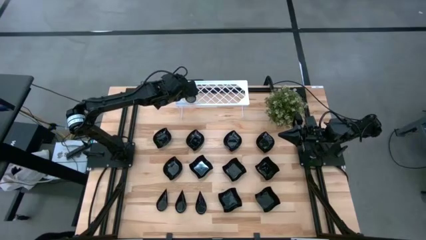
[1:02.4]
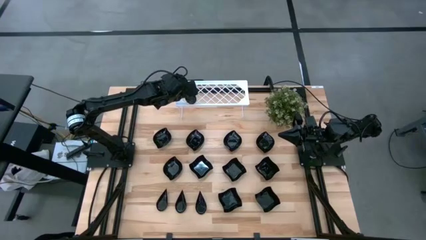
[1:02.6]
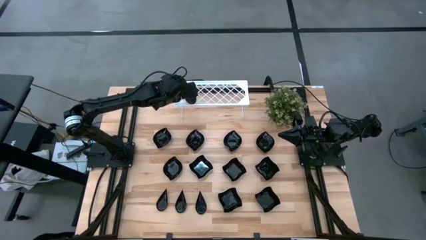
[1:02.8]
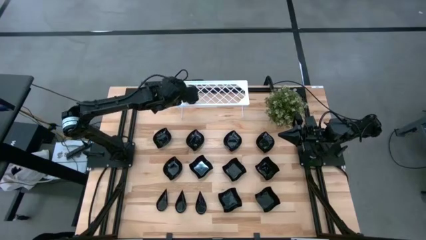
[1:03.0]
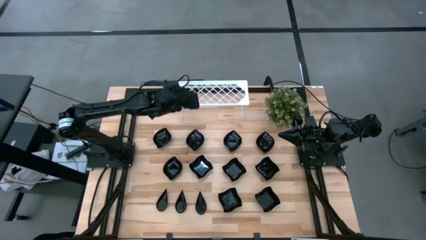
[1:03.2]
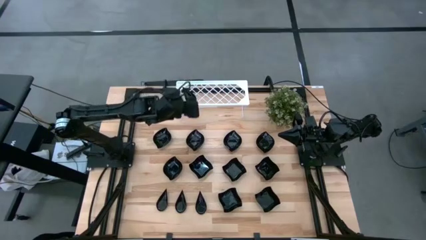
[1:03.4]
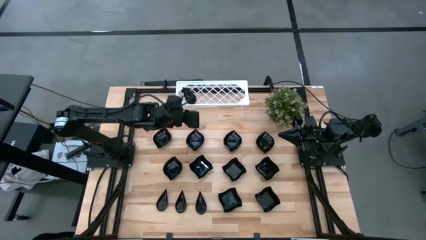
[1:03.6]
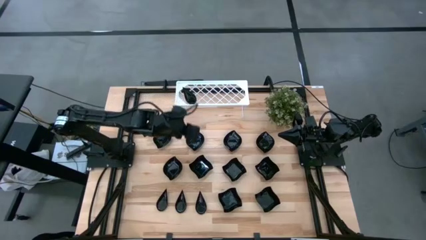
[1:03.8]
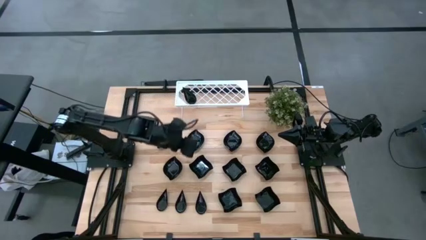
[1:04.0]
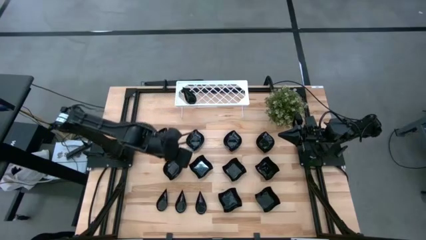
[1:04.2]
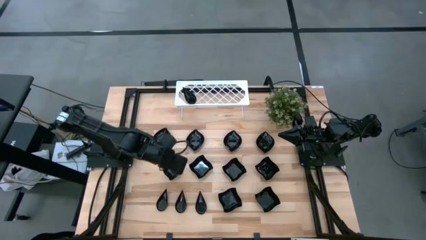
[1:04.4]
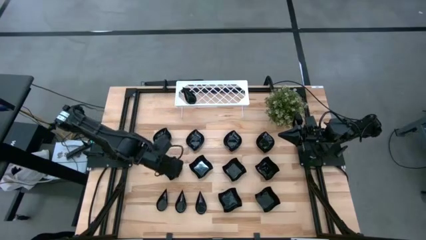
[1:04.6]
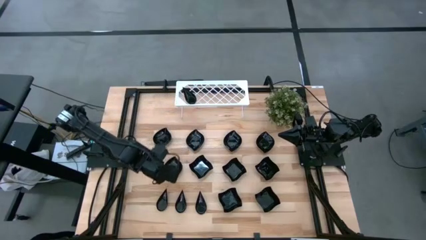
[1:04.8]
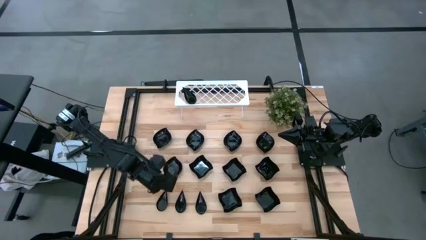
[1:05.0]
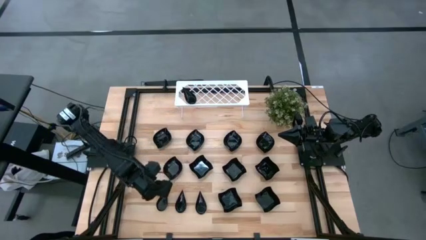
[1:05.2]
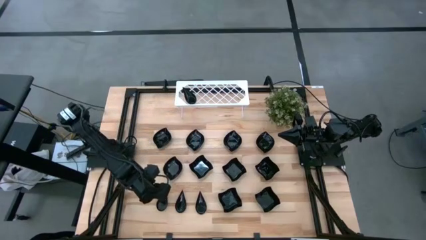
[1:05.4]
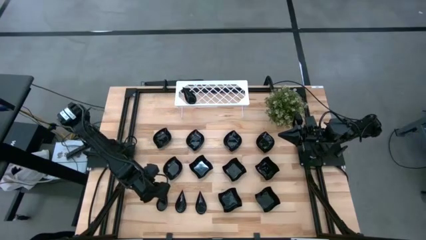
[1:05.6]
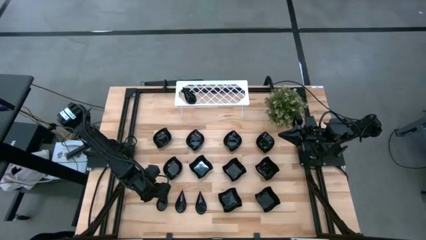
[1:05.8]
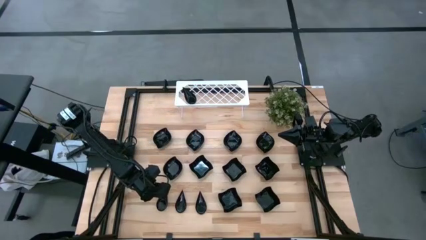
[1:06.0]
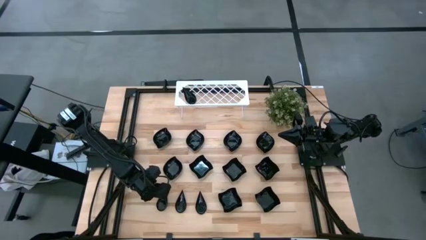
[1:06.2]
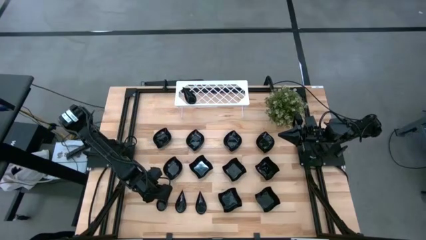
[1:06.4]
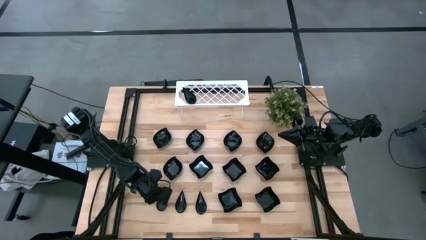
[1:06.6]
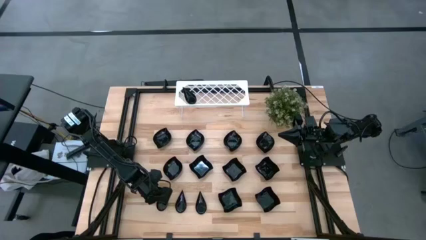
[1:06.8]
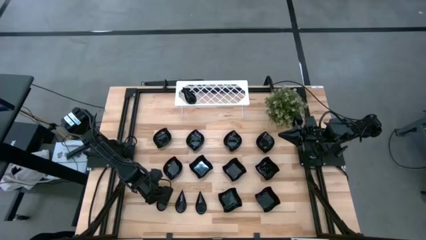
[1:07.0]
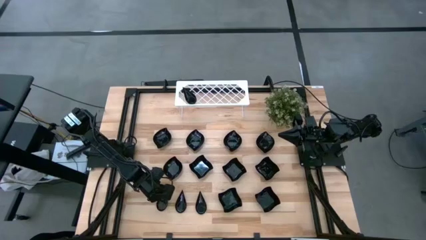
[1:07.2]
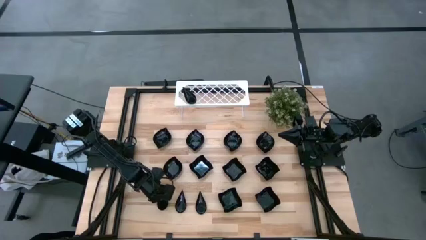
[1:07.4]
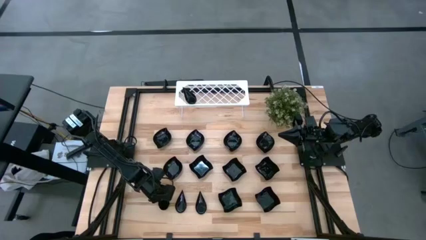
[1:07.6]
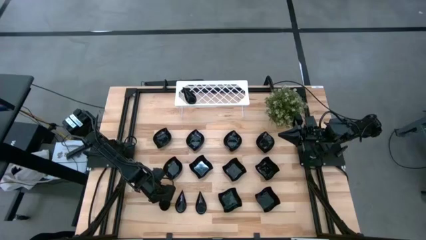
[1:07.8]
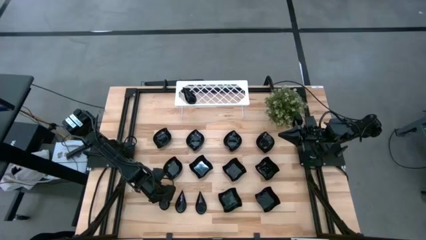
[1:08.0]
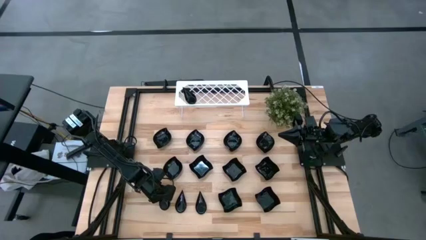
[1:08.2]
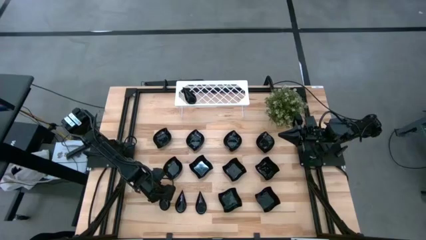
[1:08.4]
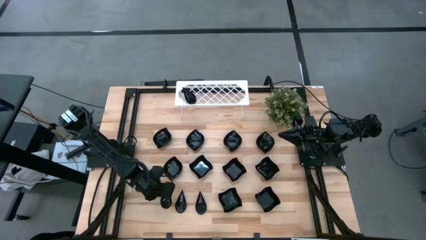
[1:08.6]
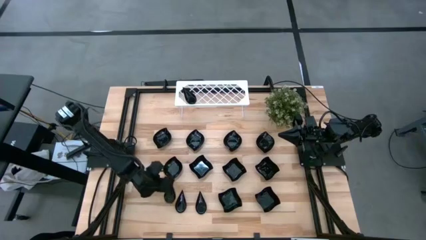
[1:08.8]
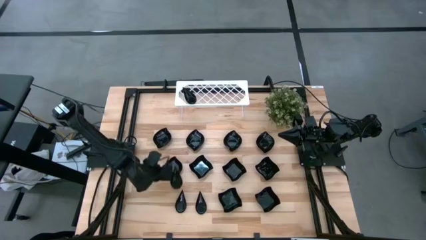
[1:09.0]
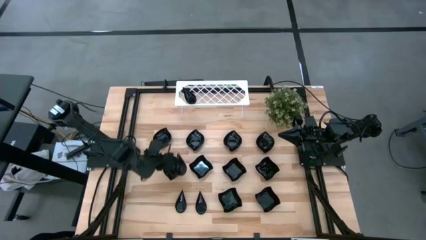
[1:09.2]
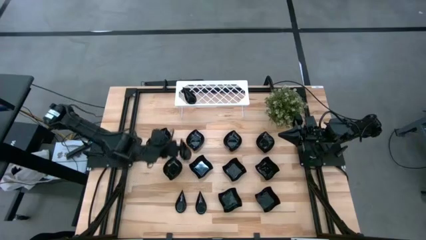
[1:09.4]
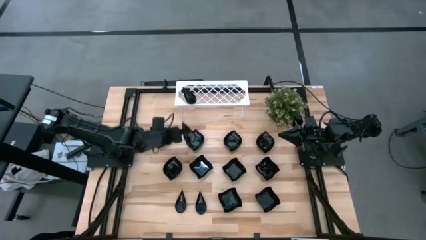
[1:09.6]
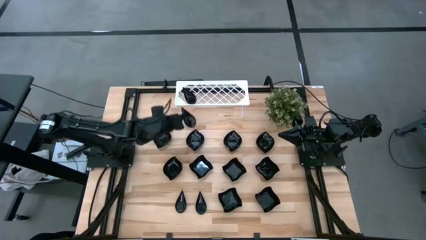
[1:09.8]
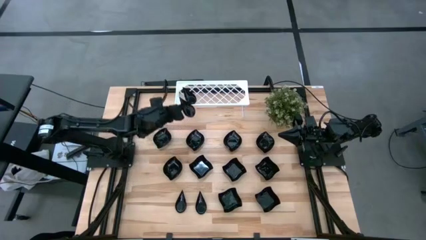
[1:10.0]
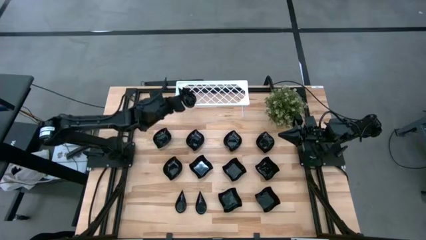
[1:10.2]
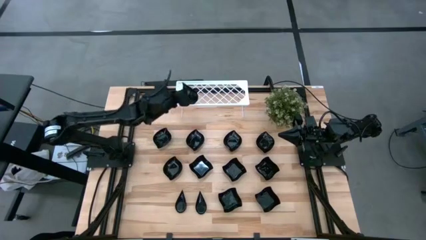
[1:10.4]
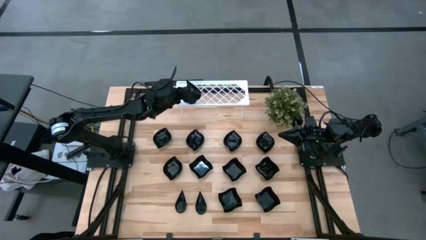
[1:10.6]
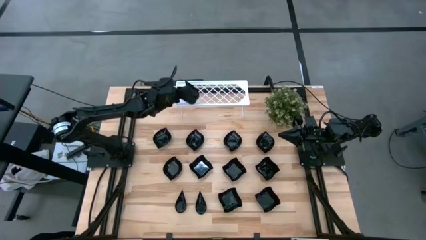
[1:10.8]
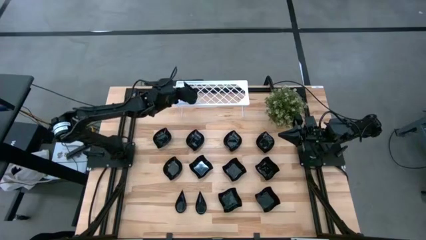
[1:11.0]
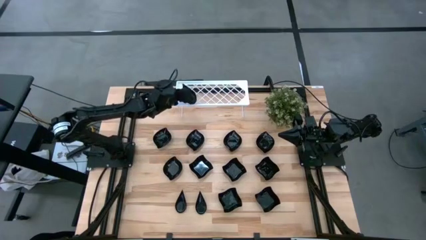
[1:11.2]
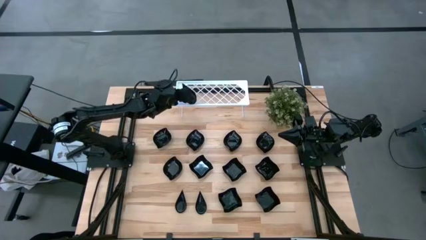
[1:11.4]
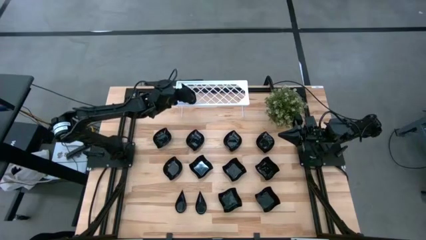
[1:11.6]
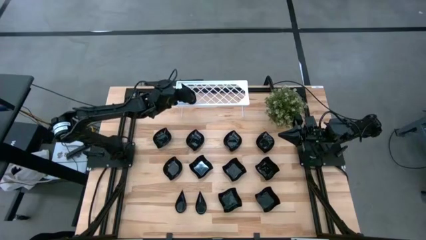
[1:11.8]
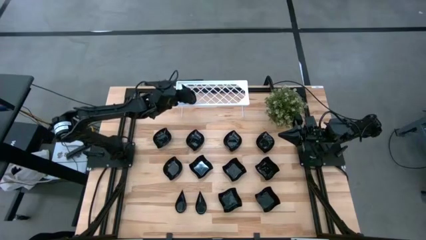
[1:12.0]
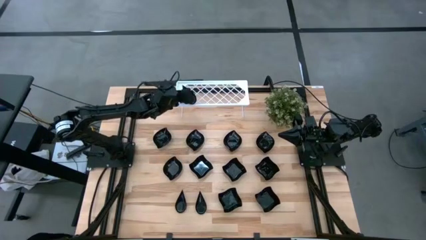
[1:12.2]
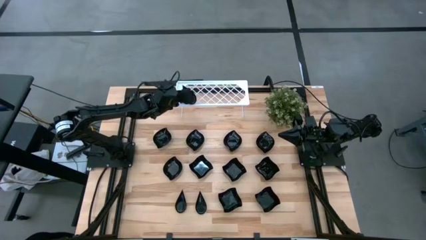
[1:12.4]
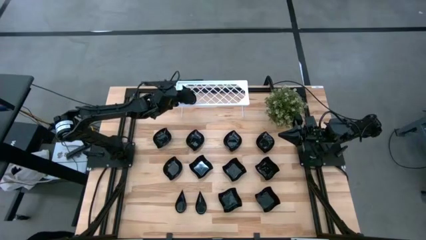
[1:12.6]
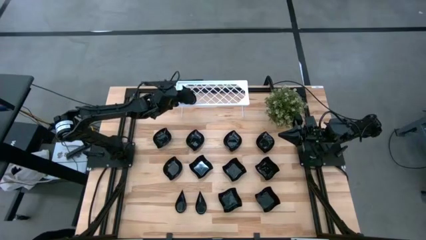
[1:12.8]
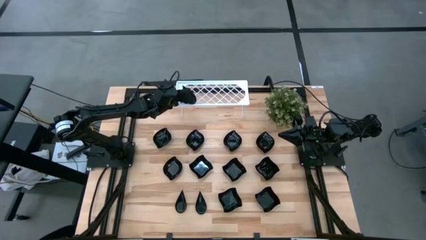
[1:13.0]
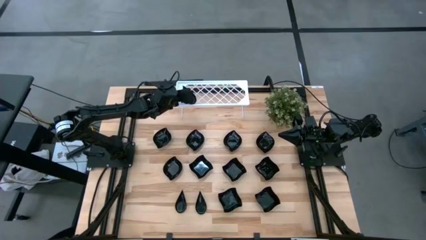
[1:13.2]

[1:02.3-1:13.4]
Task: Pick & Place Mini shaped plates
Stack the left black drop shaped plate on top of the black drop shaped plates on the shelf

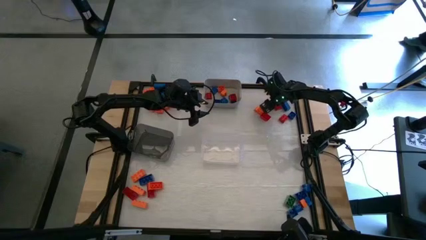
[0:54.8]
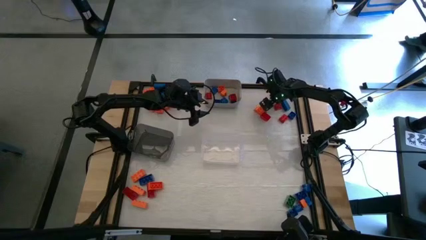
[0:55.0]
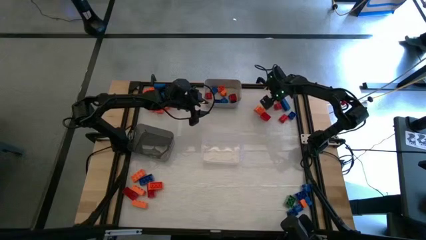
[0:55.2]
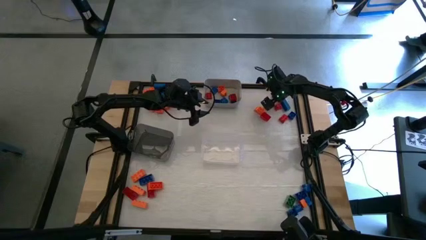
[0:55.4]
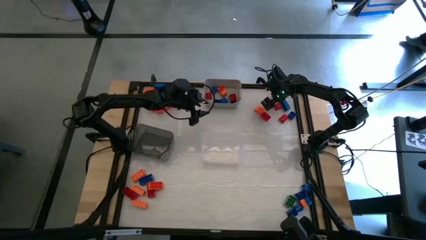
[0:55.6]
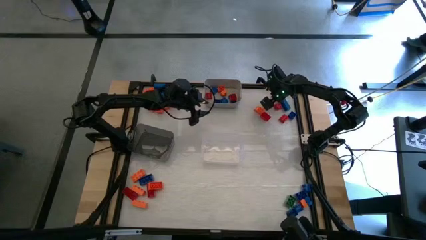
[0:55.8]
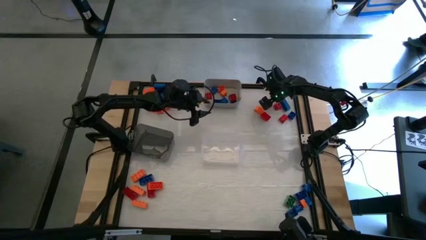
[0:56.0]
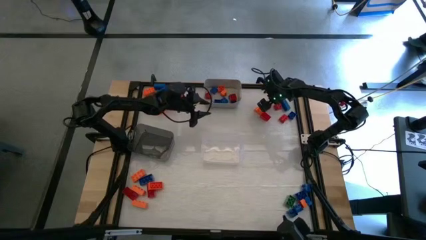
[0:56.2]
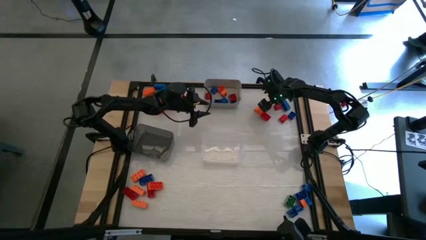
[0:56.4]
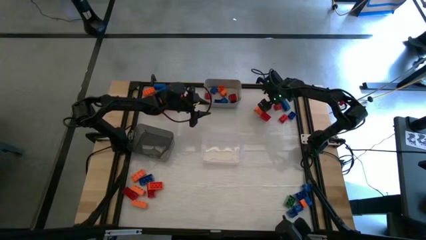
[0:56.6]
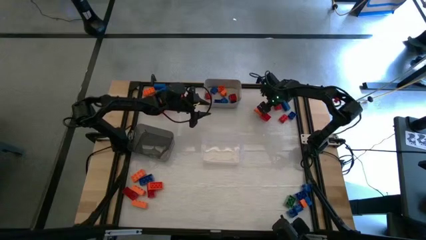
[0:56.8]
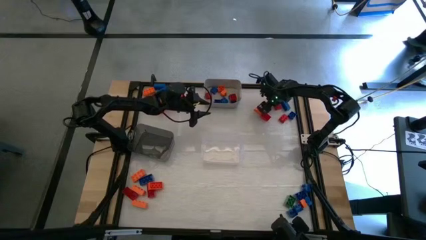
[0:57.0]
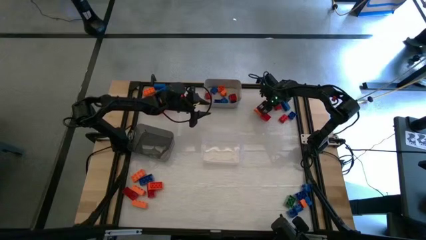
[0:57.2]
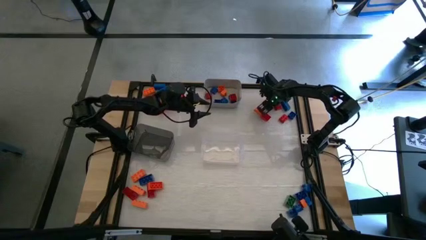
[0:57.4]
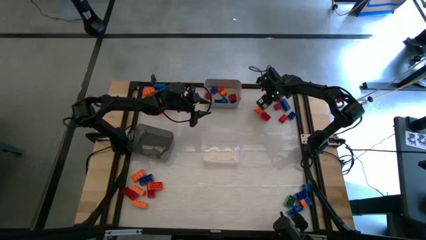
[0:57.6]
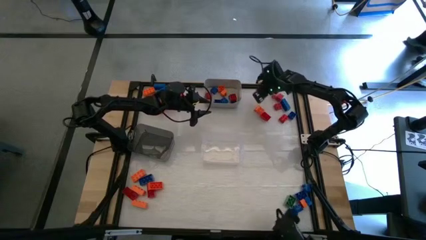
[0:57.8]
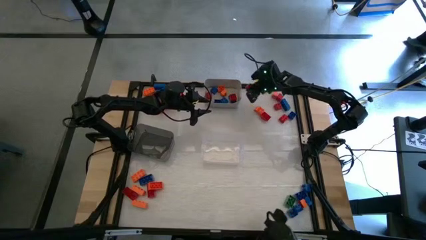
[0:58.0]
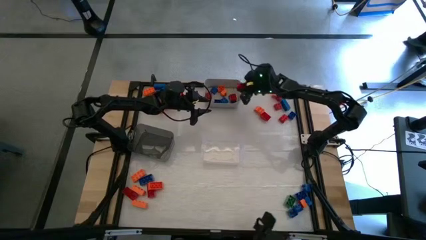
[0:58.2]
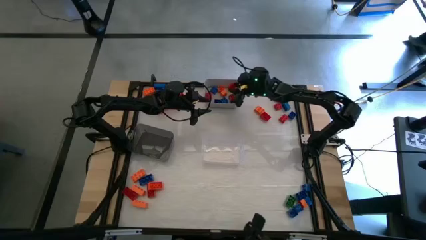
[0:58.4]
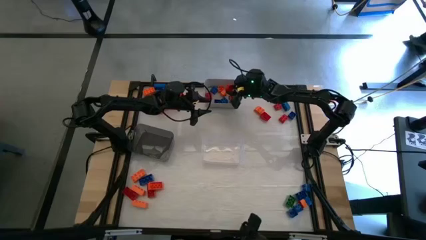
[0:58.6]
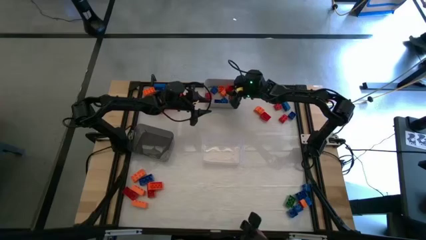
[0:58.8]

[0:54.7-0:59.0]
Task: Sort blocks by size
Put the small red game piece into the gray bin
